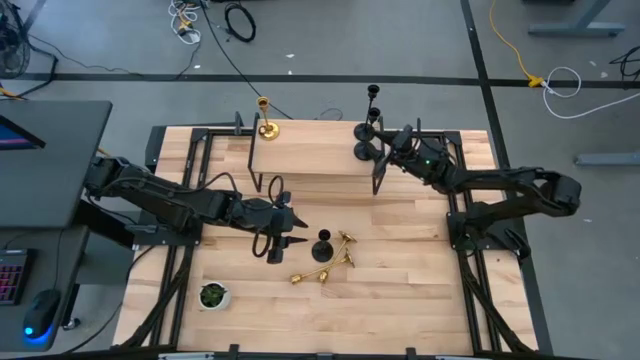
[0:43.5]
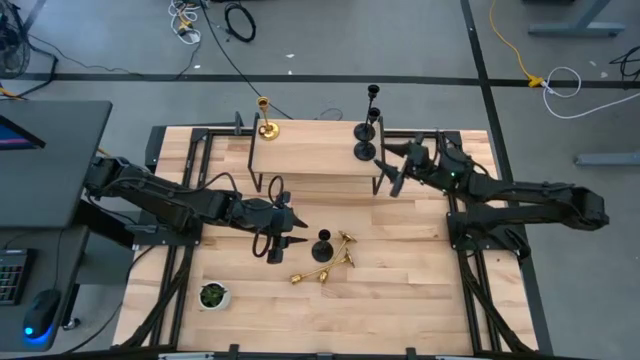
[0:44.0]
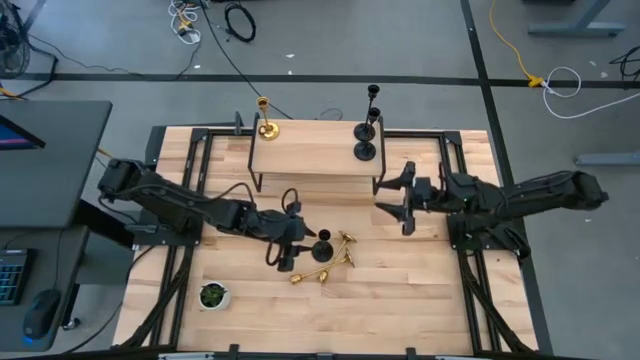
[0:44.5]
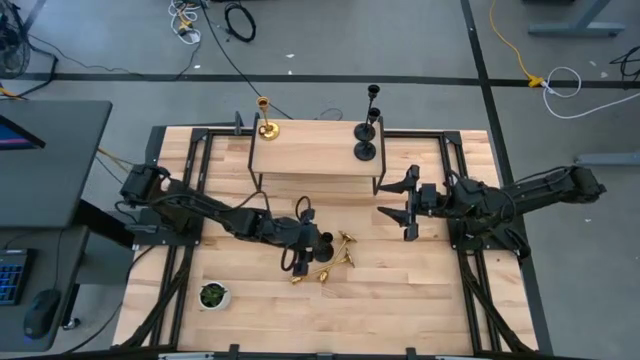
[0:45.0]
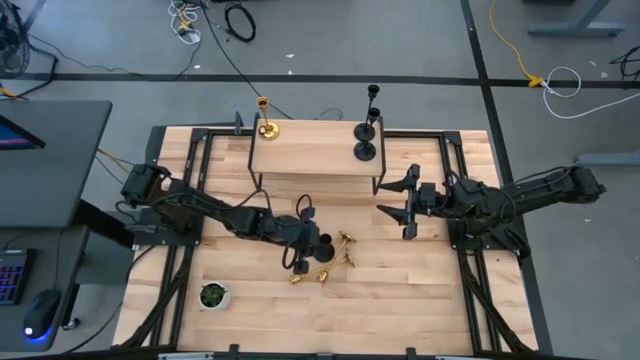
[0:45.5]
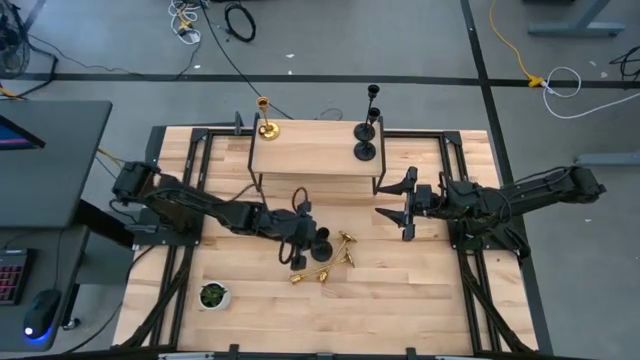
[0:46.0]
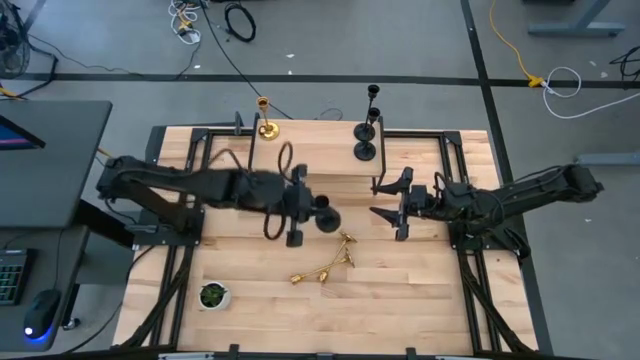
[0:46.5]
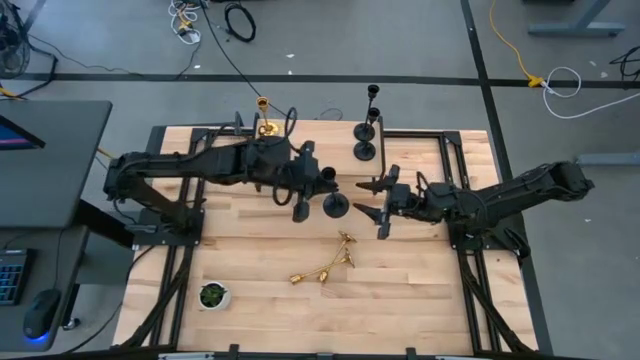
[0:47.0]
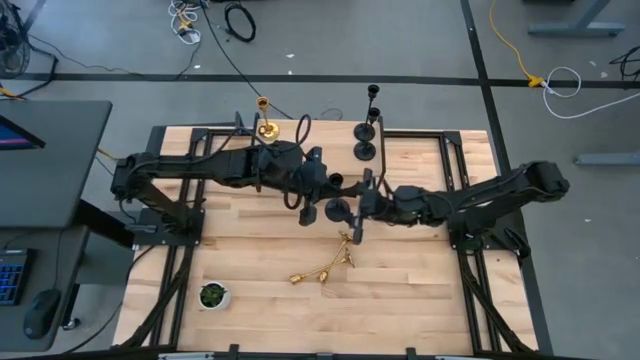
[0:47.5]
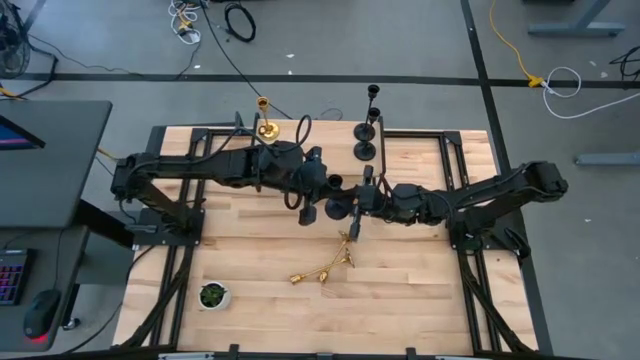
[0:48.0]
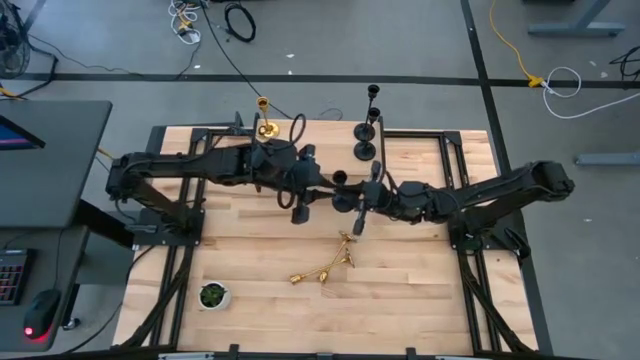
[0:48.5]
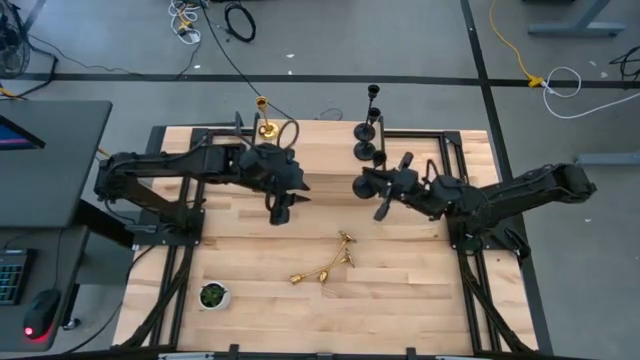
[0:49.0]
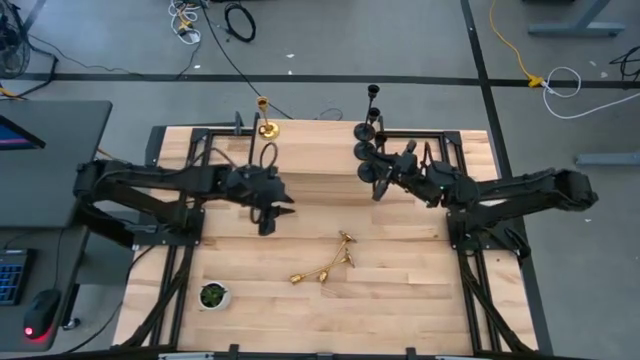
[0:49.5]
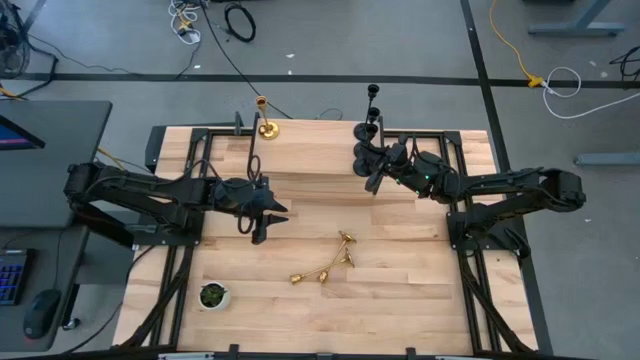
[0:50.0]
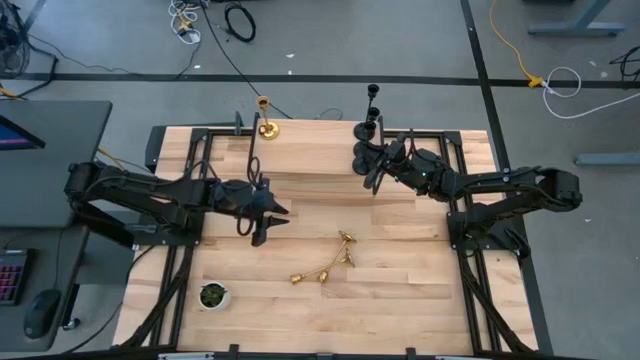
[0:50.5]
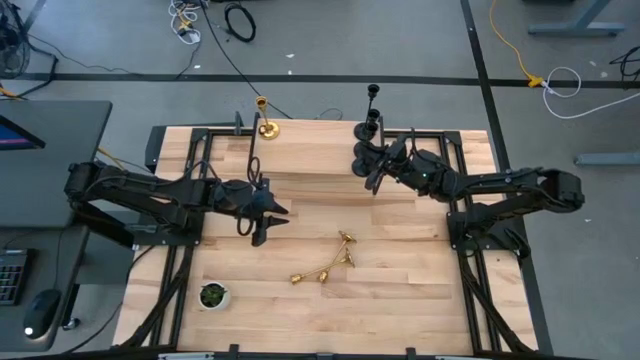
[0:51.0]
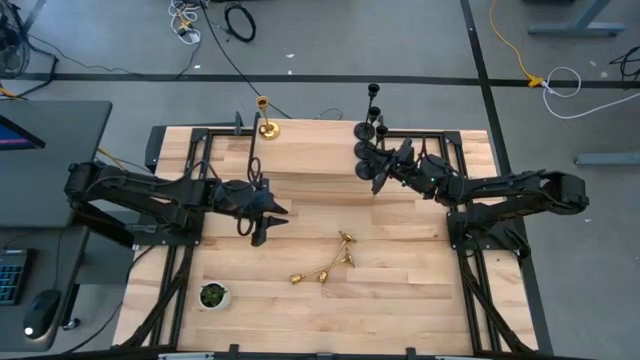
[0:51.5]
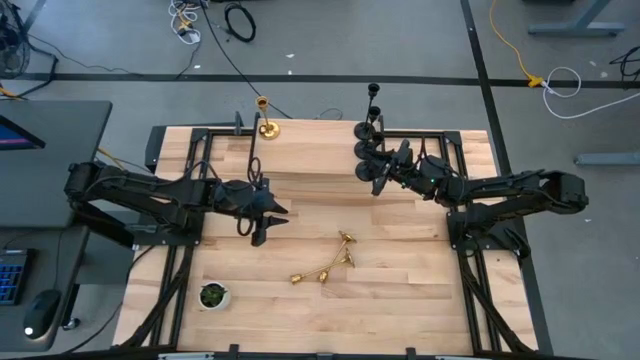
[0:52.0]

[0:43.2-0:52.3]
Task: Pick & Place candle stick holders
Put the black candle holder on the shelf aligned with the other black candle holders

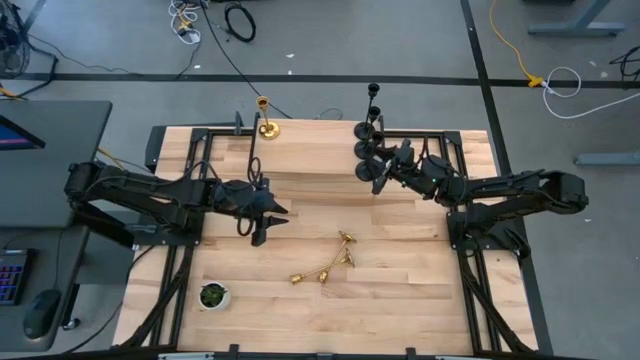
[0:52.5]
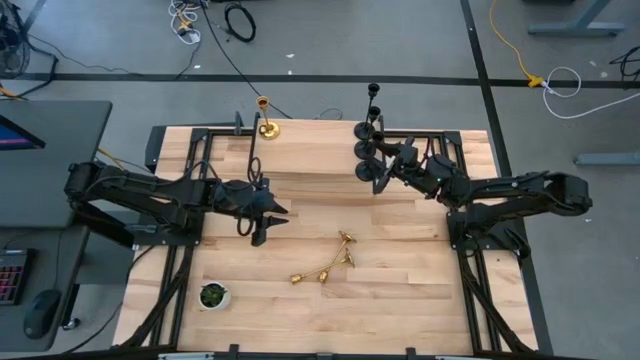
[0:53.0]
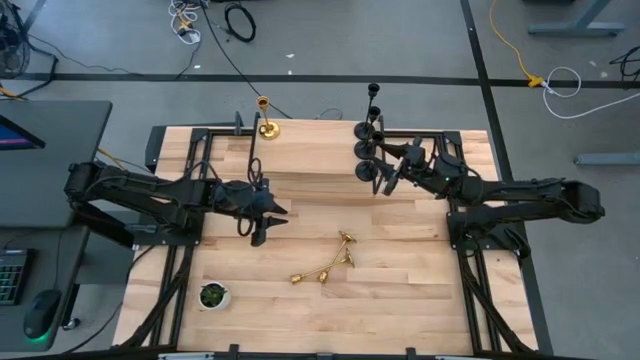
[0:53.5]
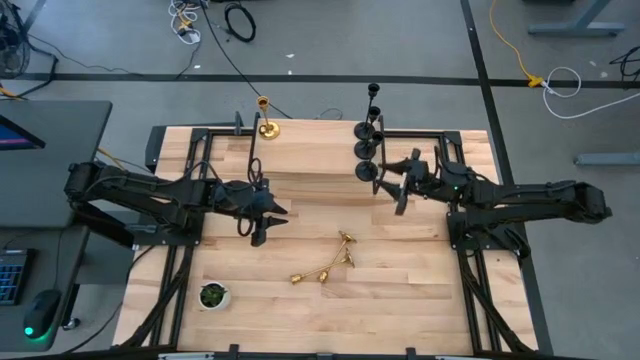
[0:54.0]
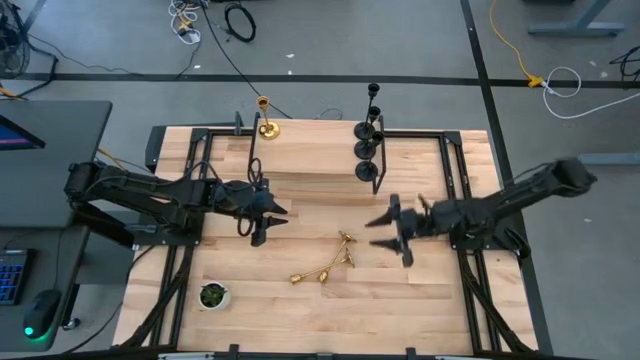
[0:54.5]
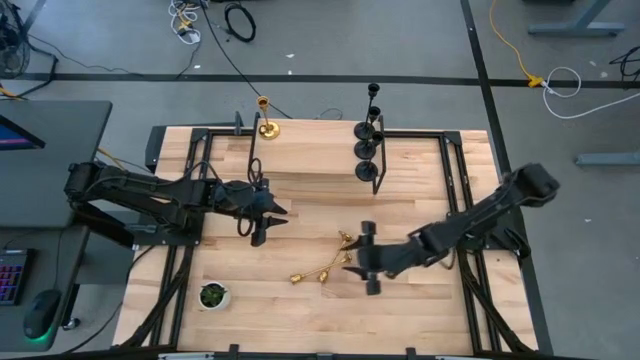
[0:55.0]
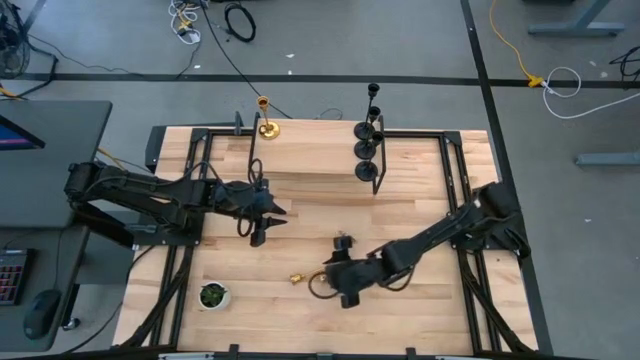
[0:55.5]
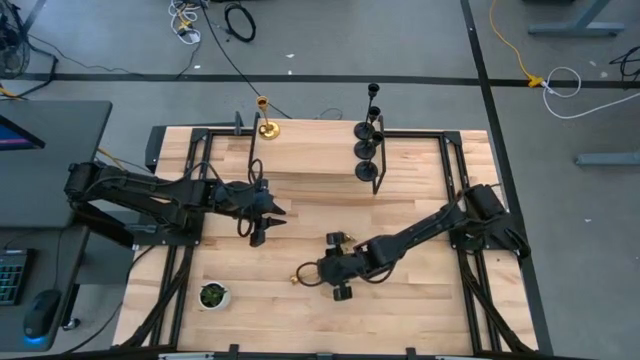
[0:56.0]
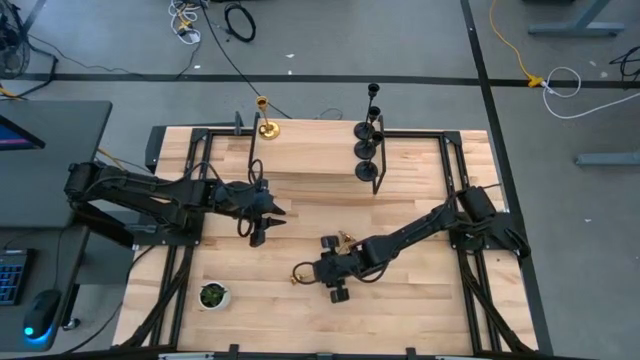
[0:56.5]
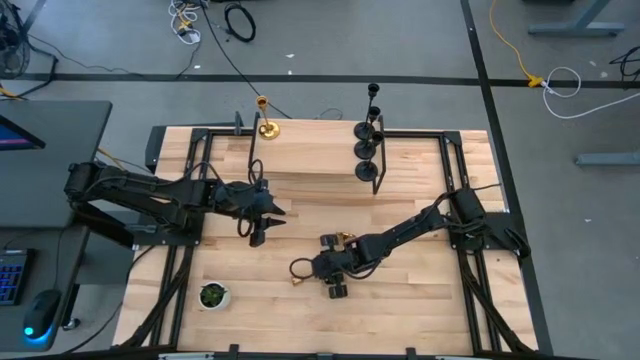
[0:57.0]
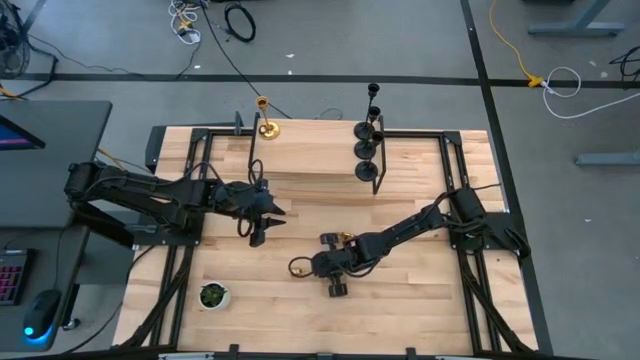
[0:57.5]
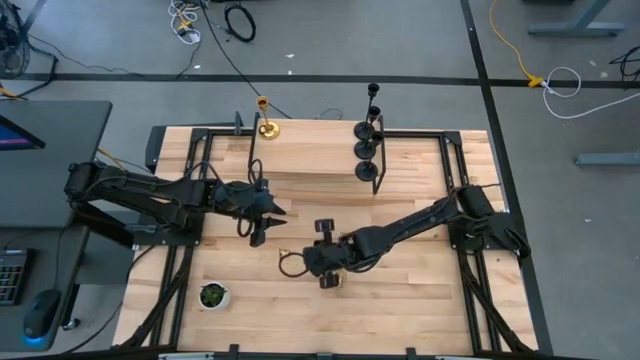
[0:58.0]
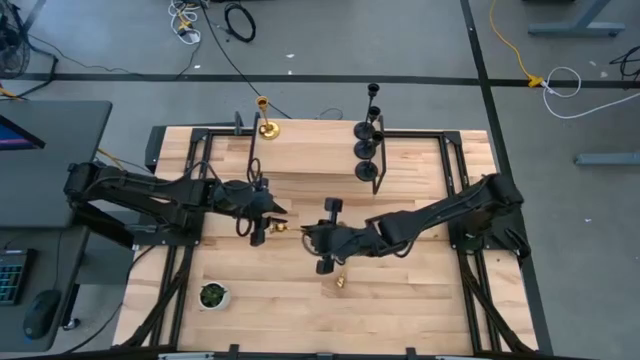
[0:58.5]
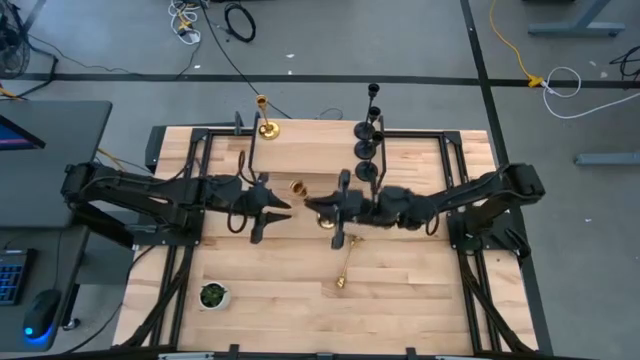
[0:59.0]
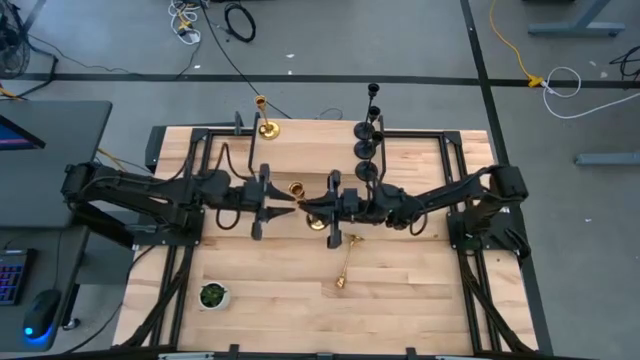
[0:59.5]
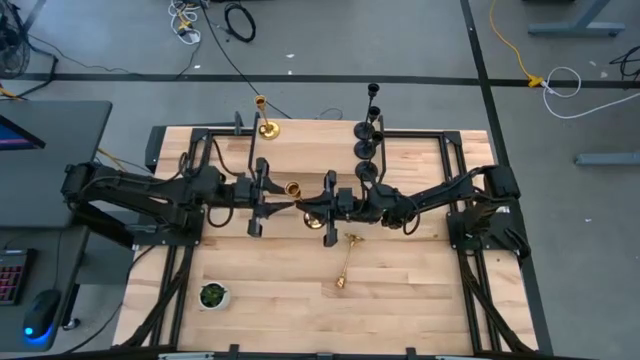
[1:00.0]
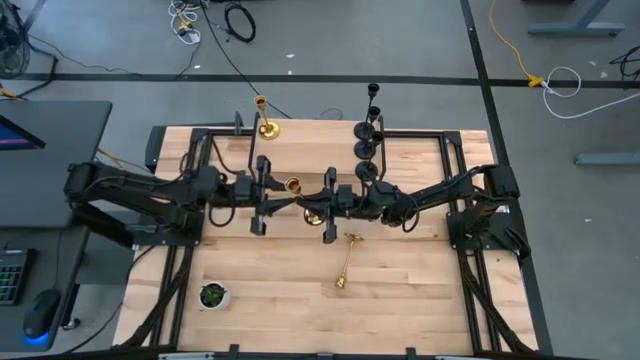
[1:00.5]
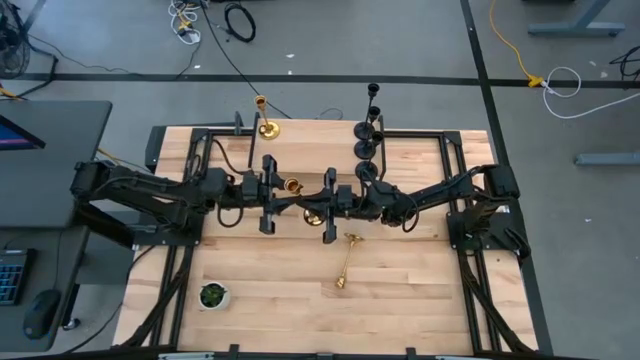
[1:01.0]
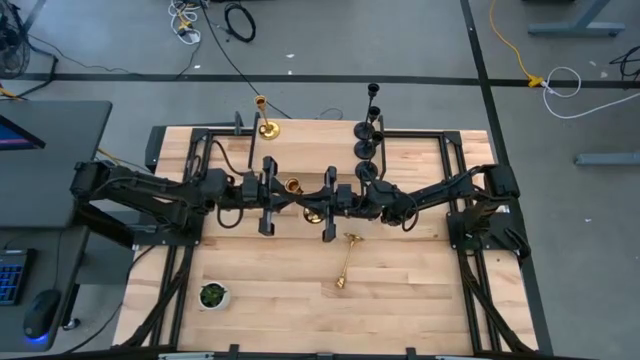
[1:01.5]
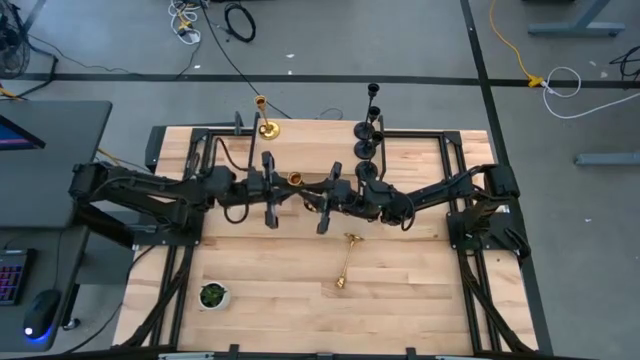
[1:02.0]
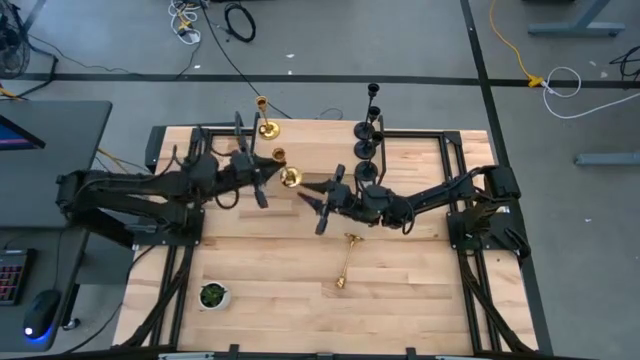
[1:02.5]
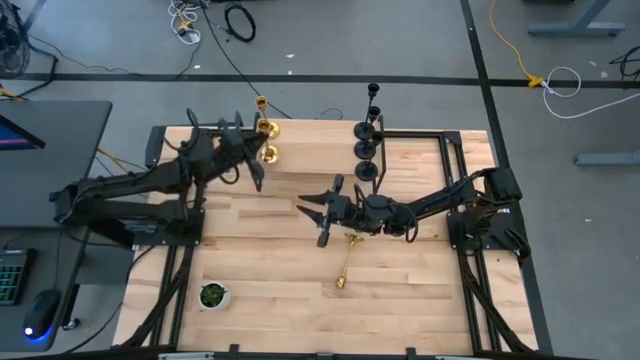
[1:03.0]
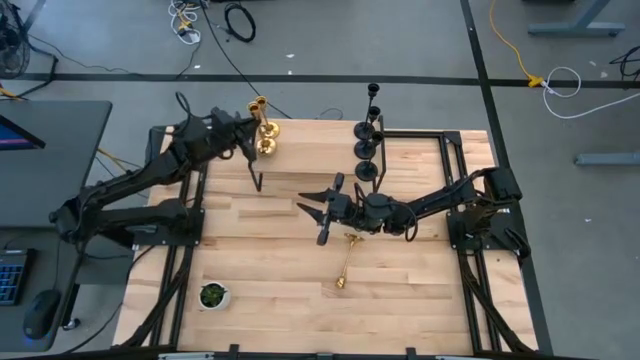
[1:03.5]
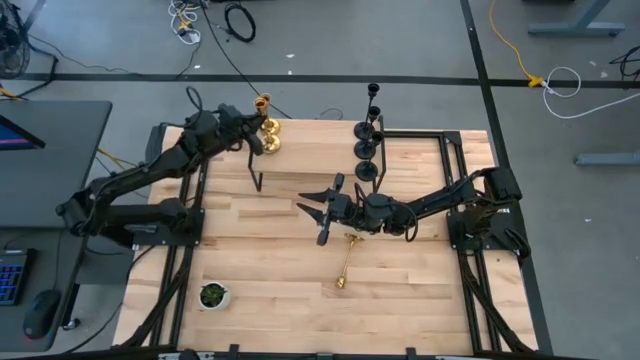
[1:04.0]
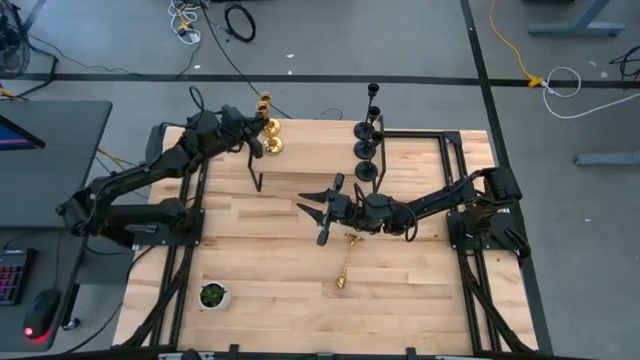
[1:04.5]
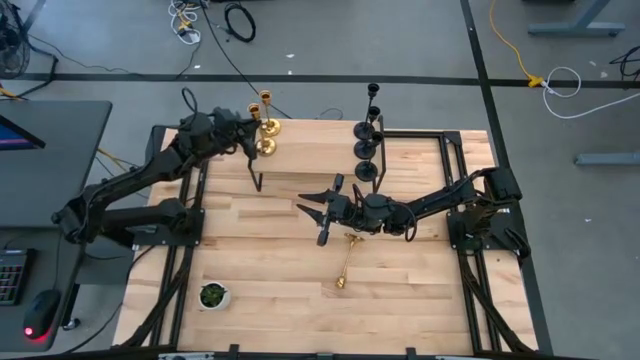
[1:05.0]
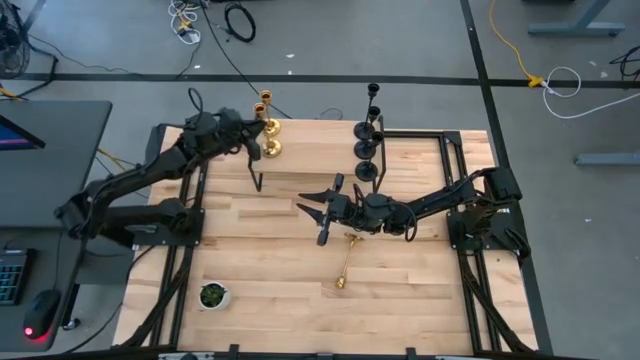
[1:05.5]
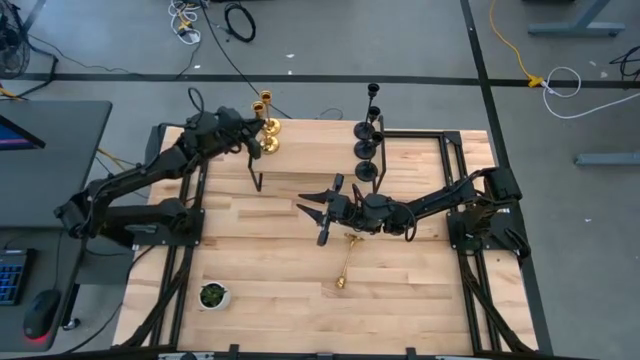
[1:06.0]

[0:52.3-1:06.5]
Put the left gold candle holder on the shelf aligned with the other gold candle holder
